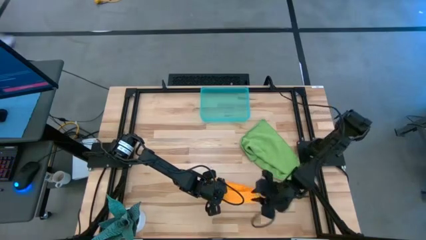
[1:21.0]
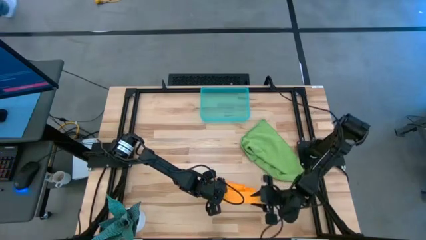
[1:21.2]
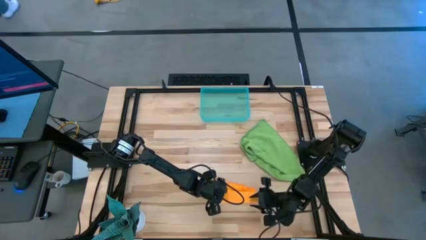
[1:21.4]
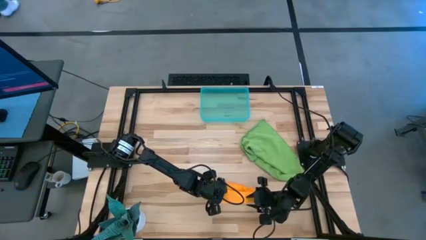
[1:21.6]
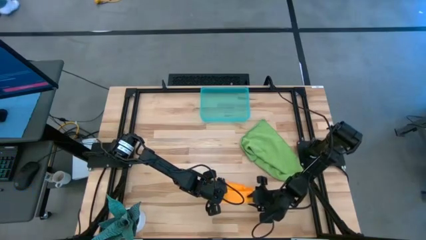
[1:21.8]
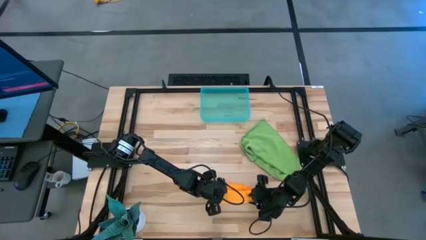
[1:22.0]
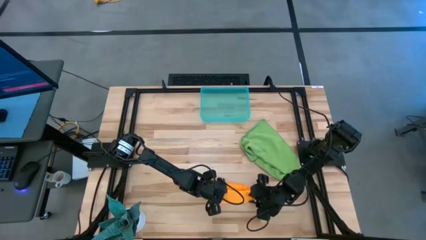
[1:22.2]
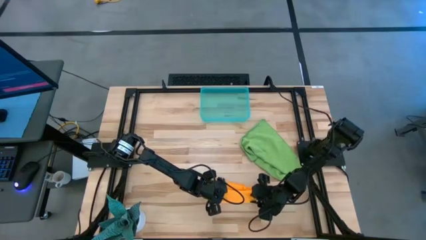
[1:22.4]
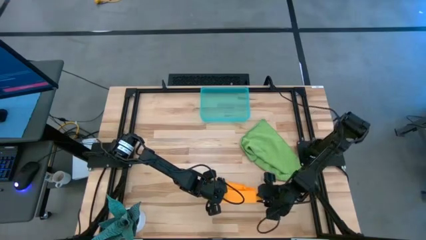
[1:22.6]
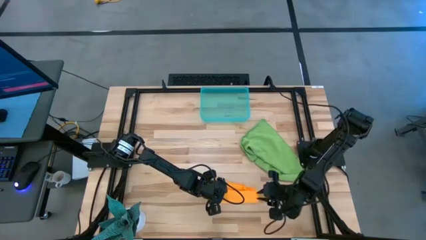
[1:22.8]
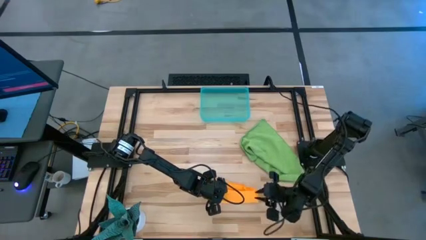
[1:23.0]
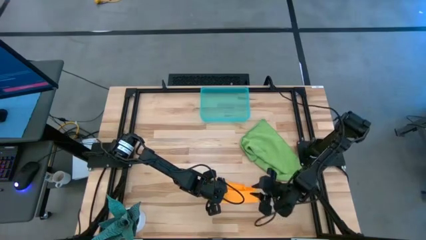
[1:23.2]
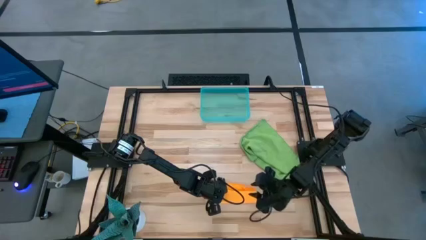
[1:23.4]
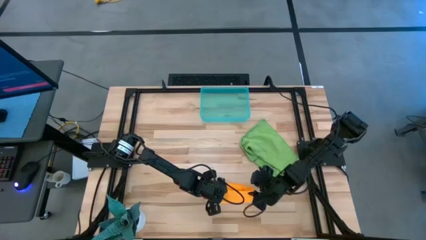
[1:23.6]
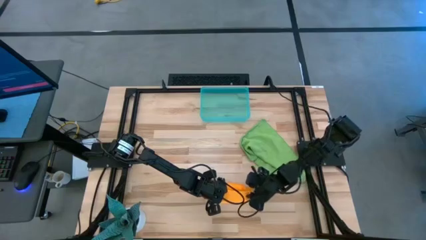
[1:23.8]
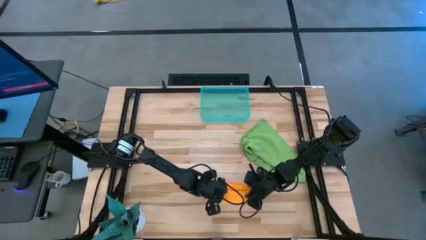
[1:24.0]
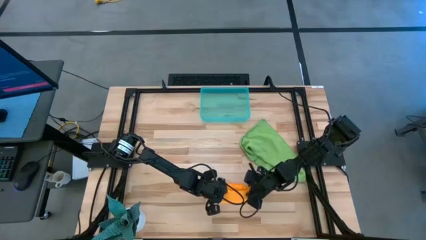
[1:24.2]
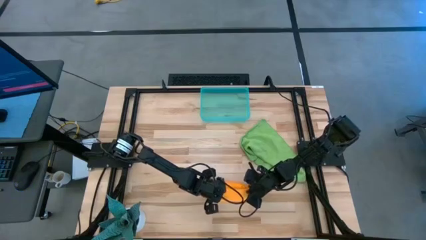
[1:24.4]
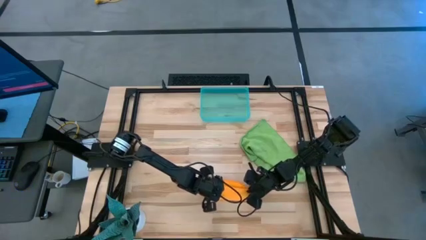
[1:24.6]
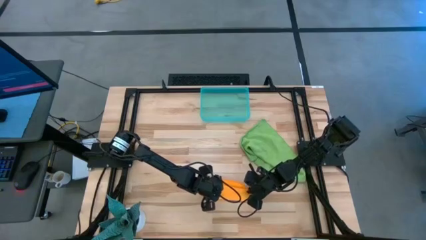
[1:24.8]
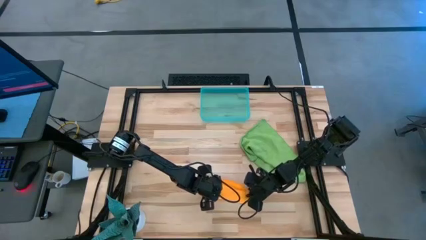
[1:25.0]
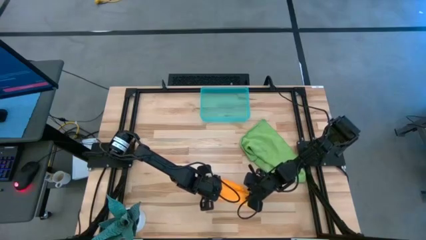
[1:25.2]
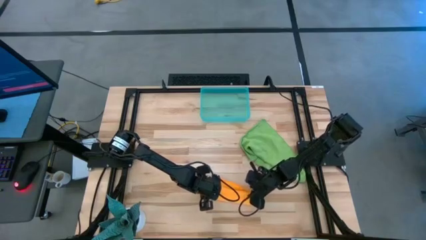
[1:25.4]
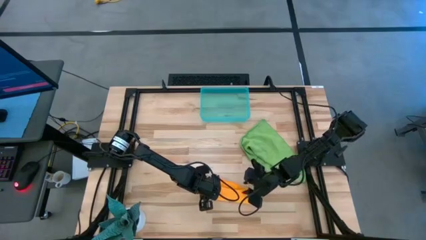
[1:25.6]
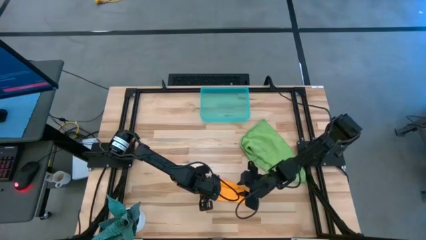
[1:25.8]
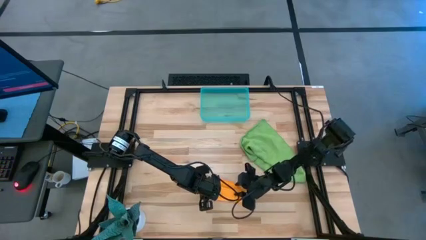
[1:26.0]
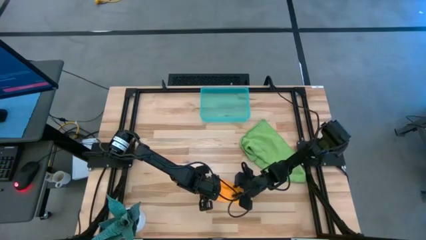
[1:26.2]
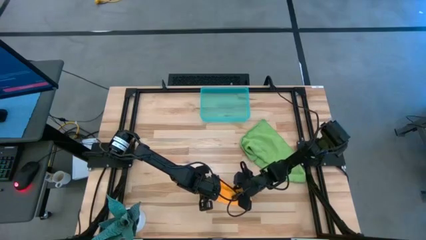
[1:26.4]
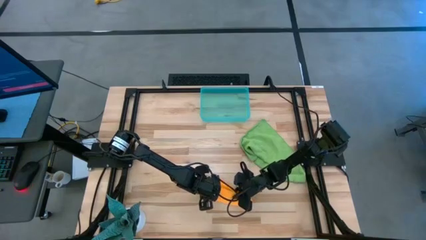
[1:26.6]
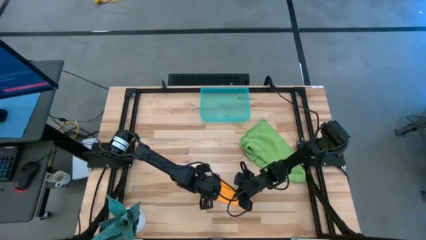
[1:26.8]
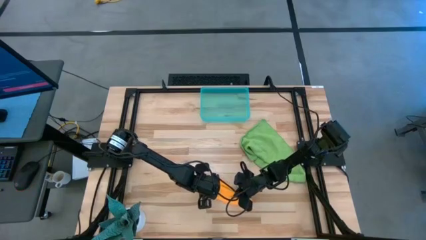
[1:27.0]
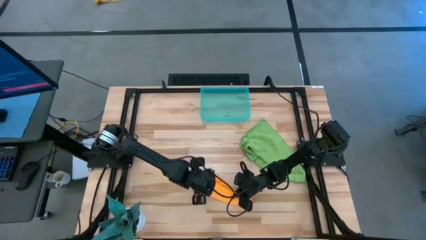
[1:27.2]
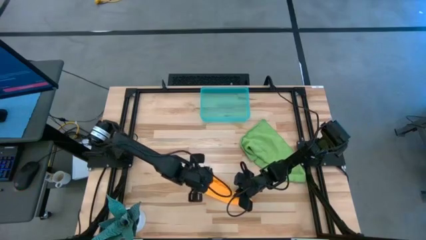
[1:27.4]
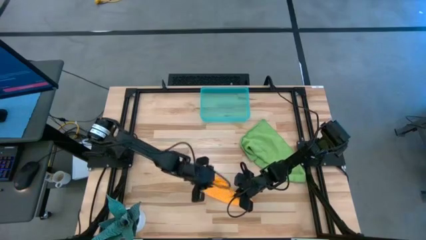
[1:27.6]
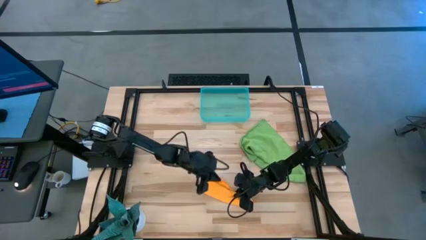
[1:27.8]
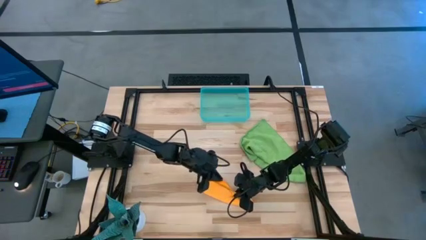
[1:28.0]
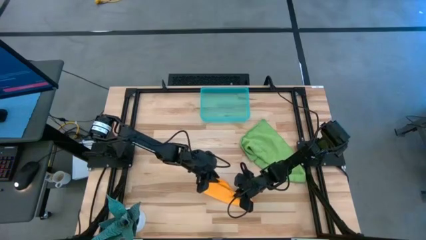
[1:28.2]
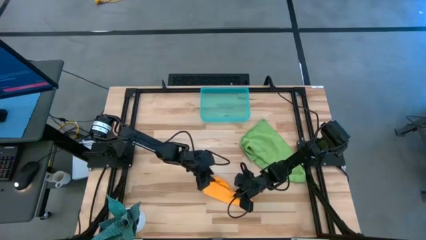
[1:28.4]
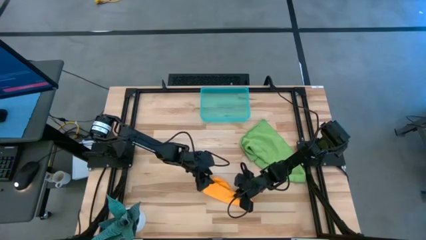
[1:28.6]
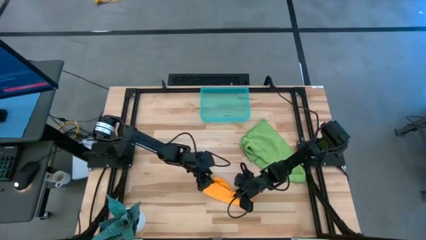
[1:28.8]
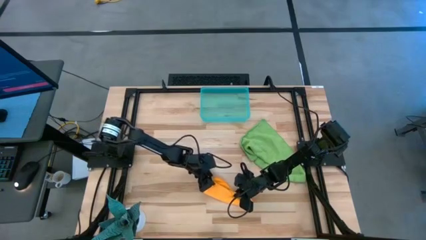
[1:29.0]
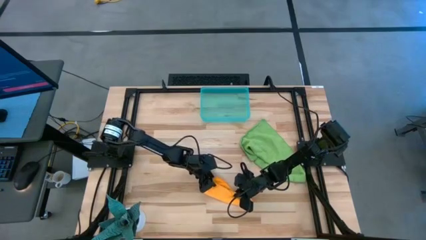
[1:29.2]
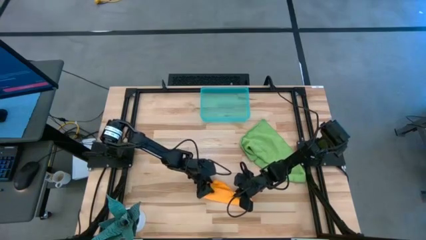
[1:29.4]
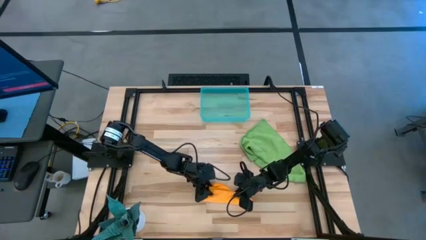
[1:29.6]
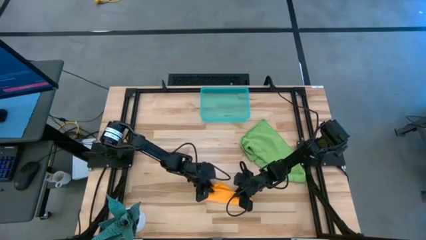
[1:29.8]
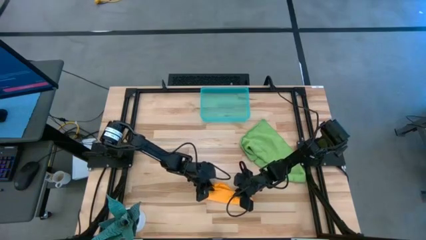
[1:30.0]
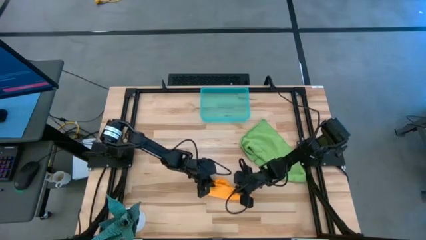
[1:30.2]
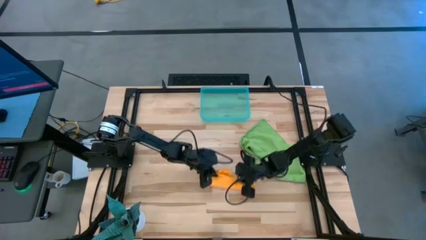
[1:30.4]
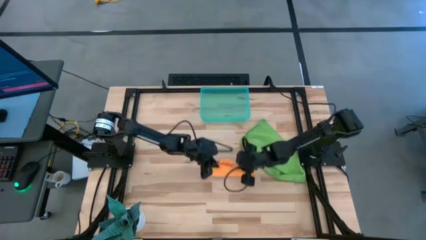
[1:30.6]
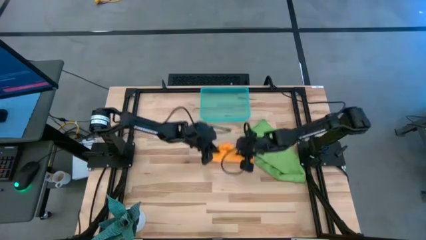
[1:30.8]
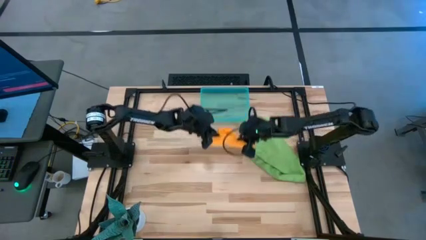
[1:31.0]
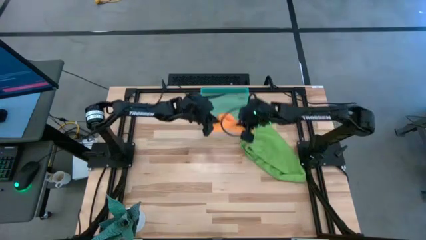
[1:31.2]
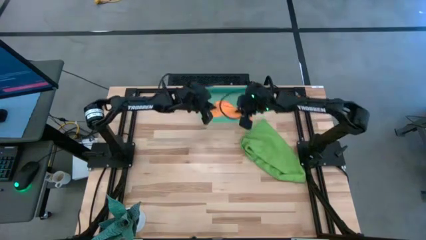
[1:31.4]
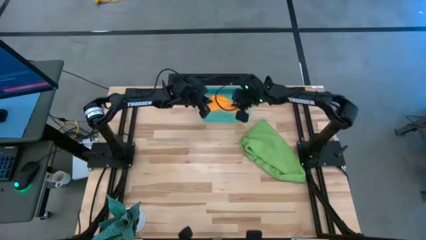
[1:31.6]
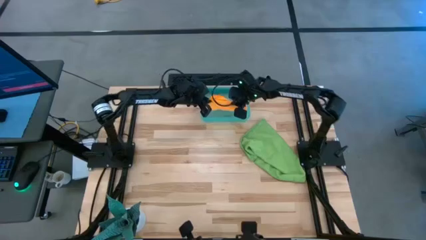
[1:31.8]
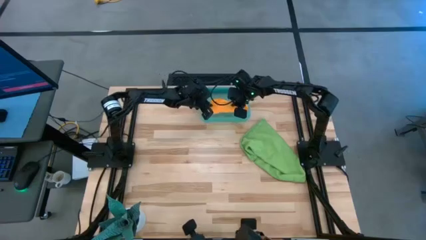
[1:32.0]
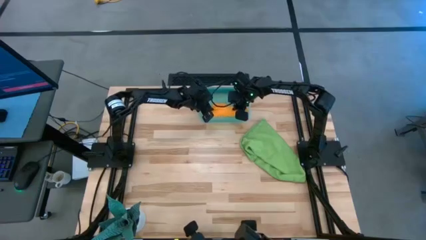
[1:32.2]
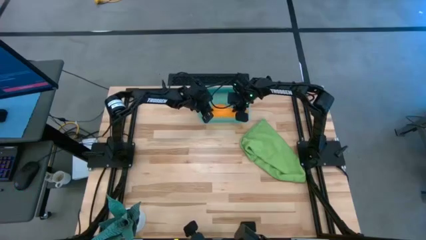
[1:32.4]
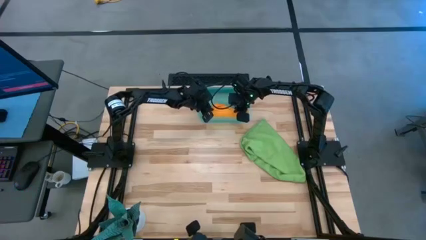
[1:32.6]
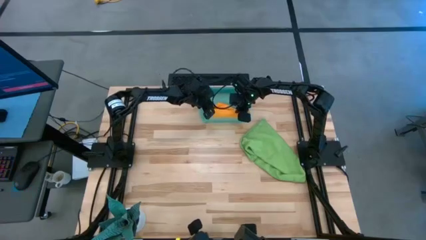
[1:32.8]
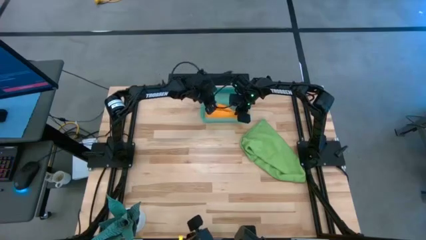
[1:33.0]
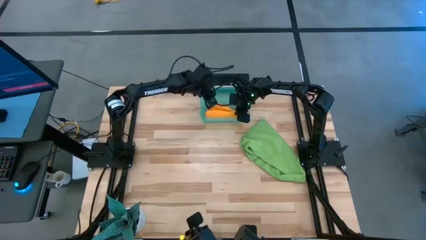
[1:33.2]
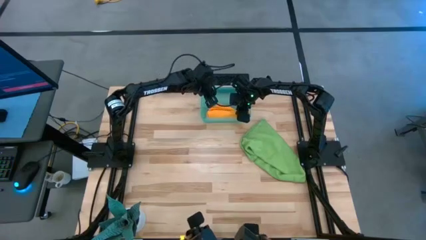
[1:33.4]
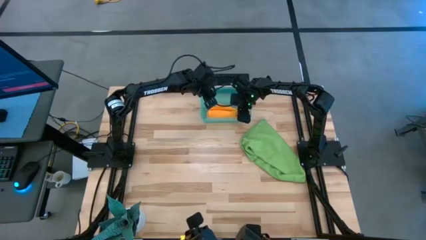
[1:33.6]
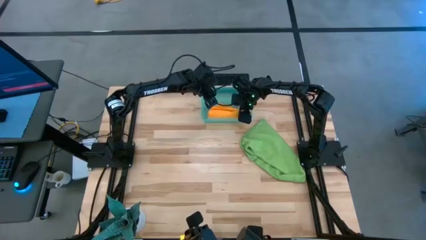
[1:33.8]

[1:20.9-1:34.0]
Task: Roll microfiber towels into tight, uniform cylinder then place into a basket
Put the rolled orange microfiber towel into the blue bin
